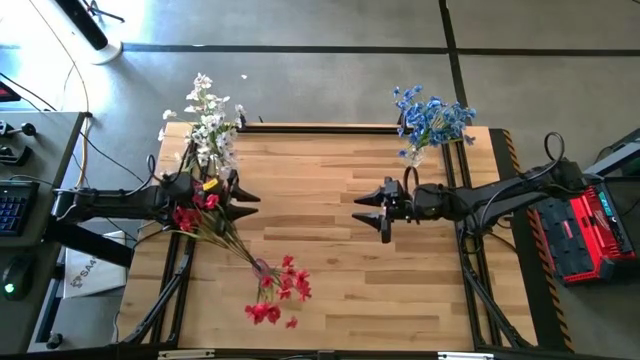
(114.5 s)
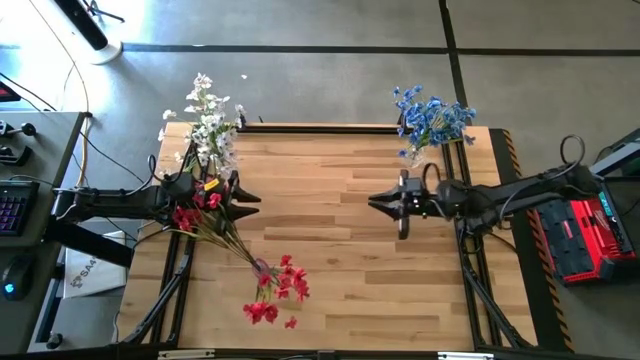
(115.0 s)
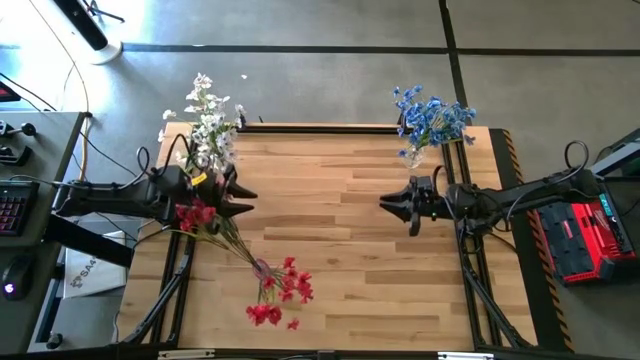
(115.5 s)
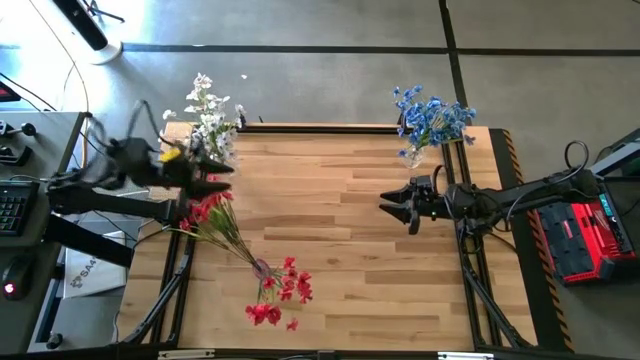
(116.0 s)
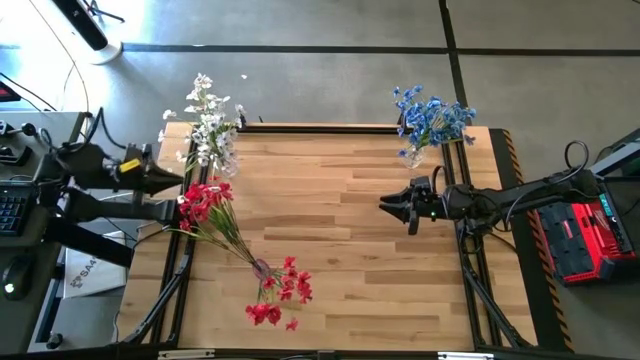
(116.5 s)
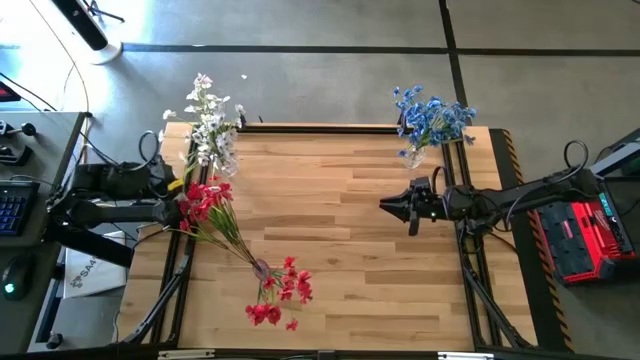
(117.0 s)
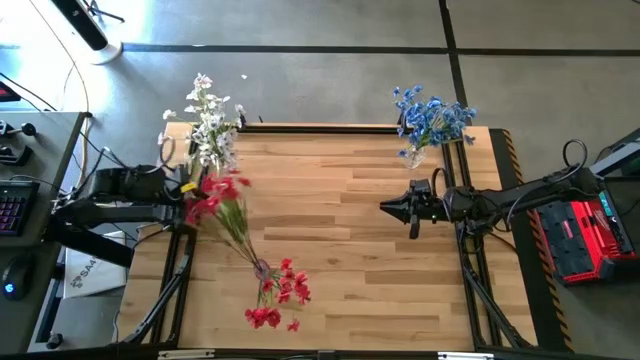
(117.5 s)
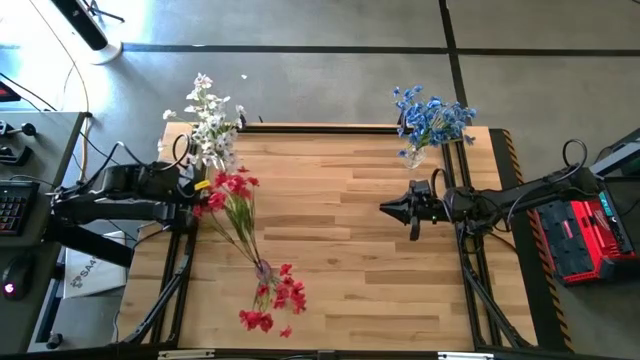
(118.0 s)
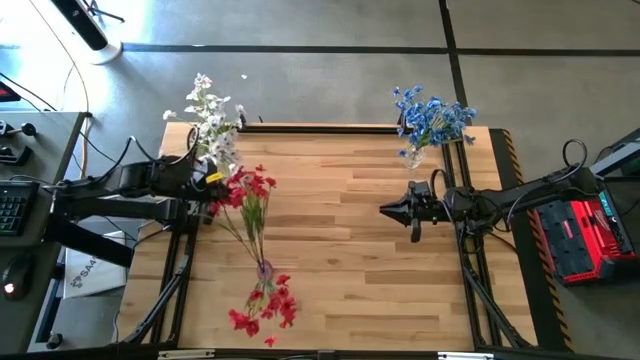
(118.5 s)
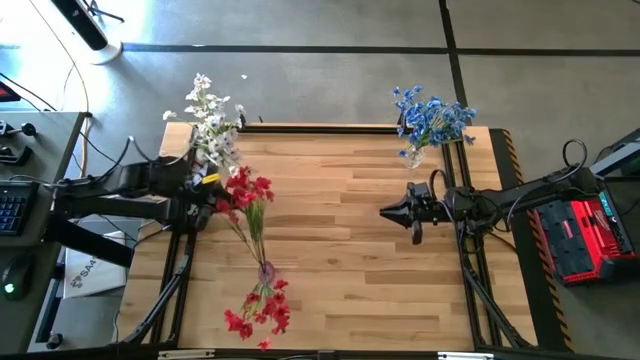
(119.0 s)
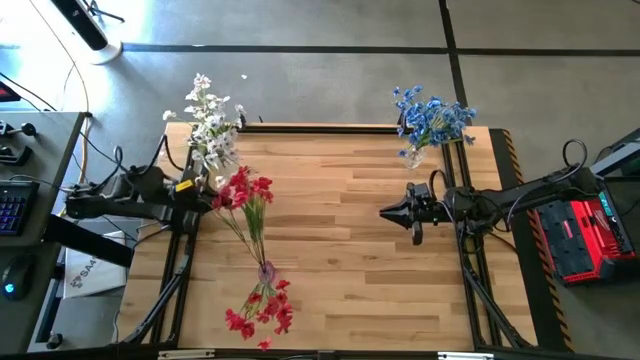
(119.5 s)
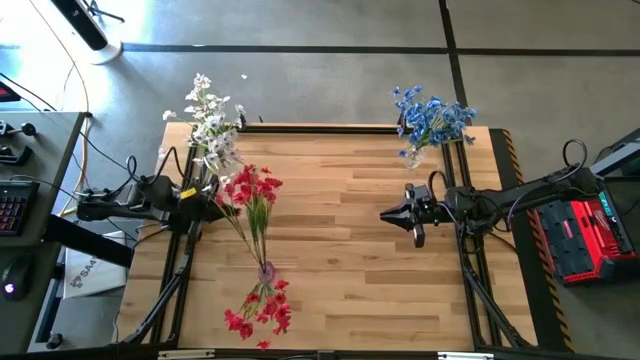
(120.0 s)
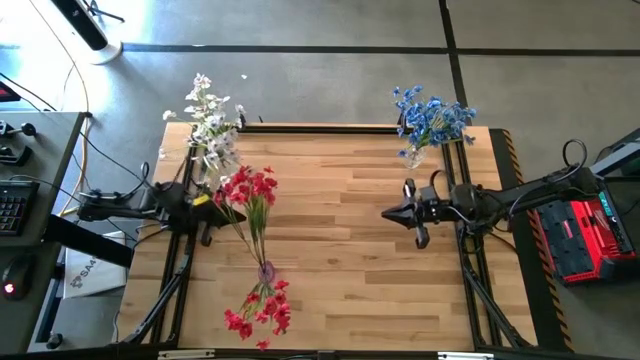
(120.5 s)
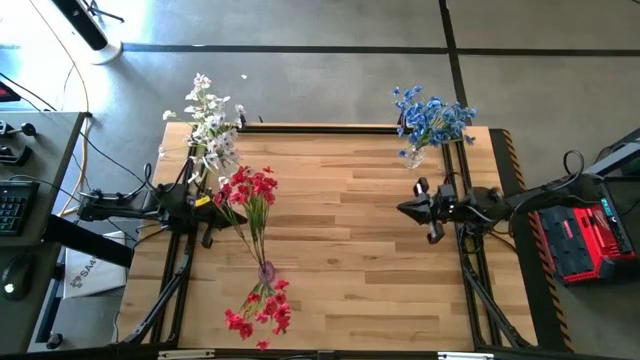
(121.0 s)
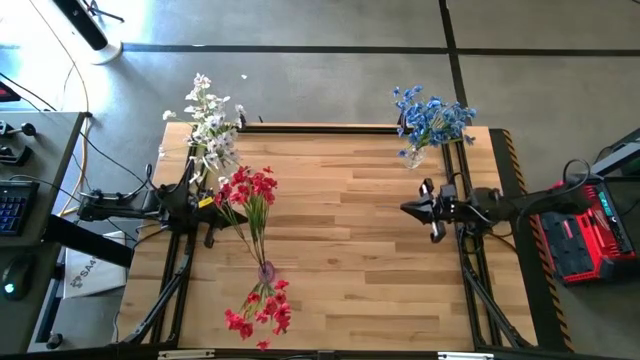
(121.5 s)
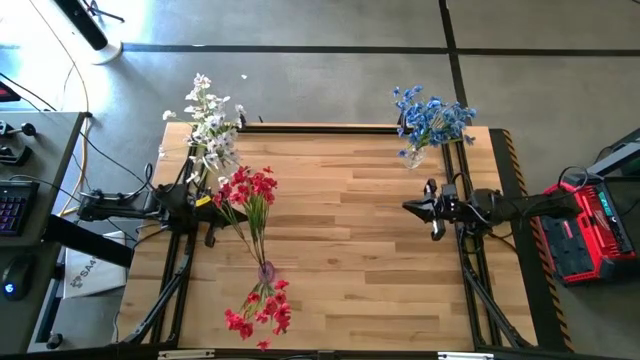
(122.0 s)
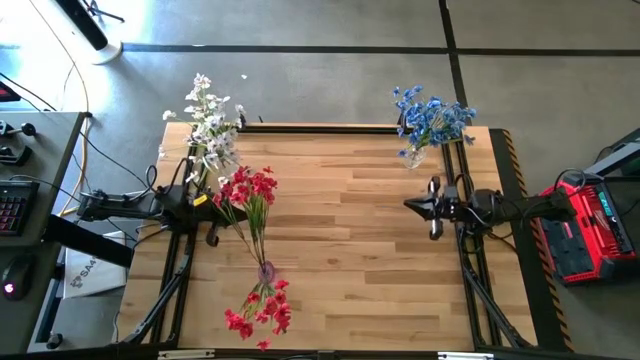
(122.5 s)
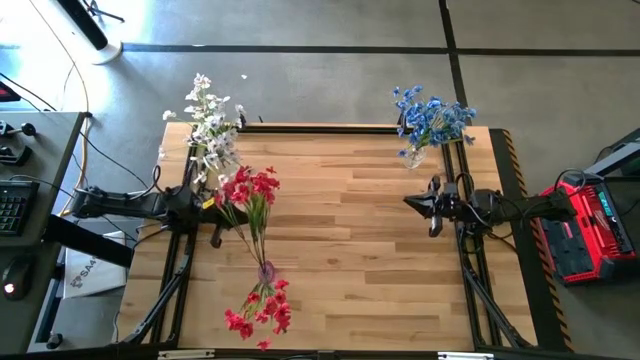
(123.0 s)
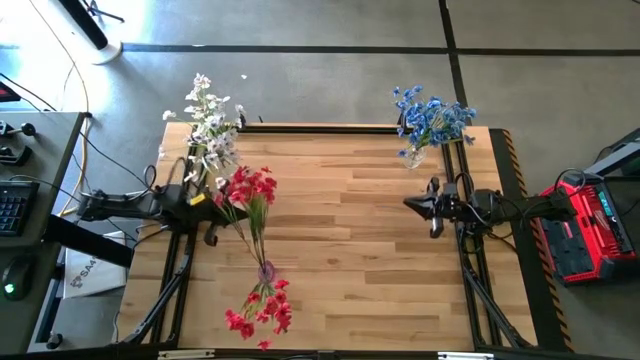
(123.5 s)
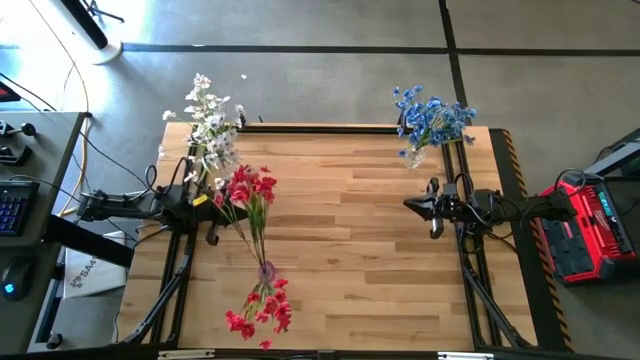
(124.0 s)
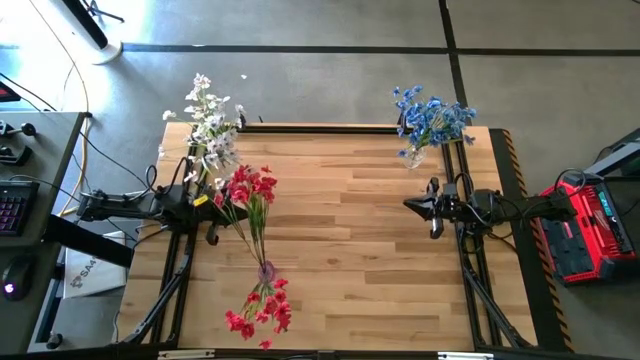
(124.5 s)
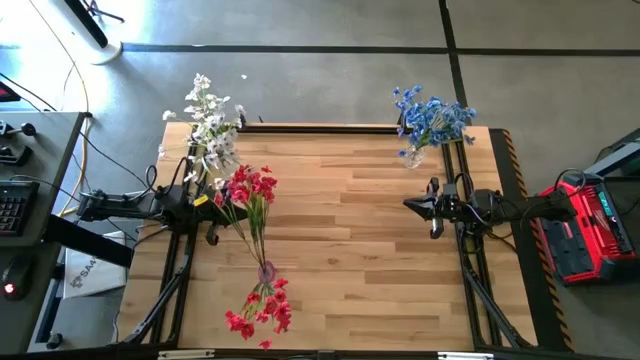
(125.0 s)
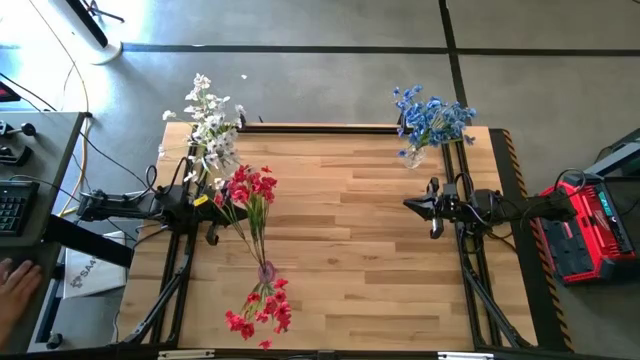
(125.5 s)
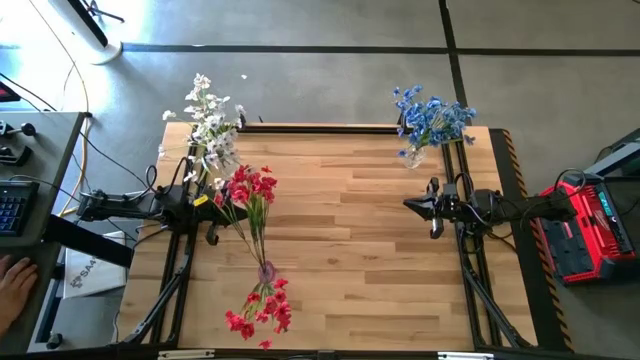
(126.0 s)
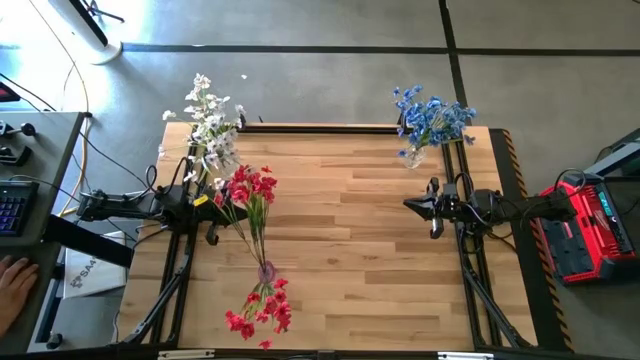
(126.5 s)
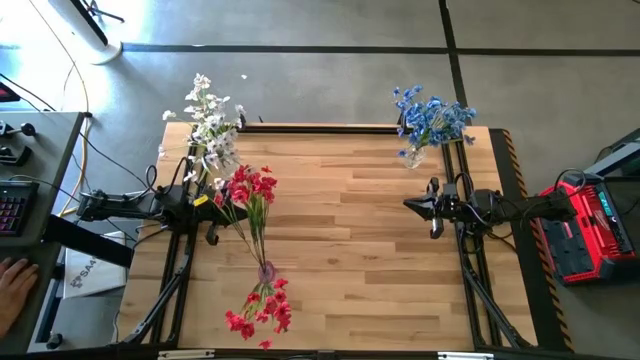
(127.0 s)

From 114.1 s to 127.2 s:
Task: Sort flowers into vase by color
Return to Home Position

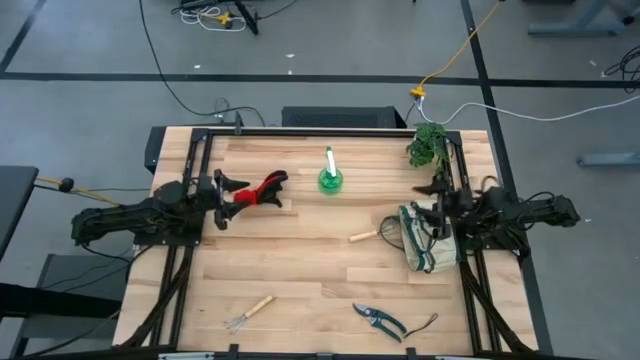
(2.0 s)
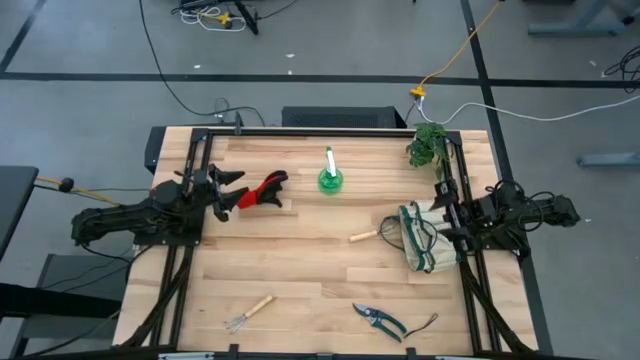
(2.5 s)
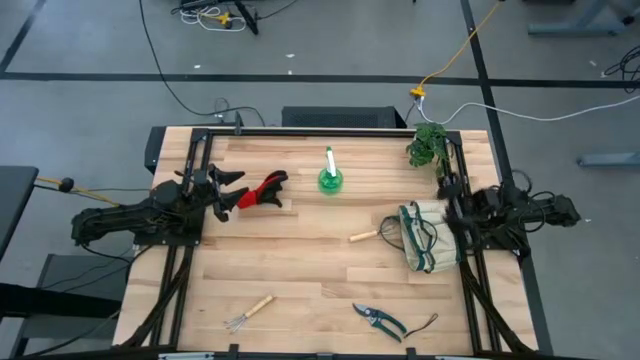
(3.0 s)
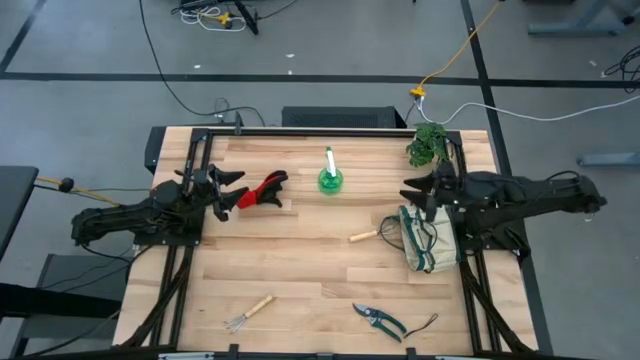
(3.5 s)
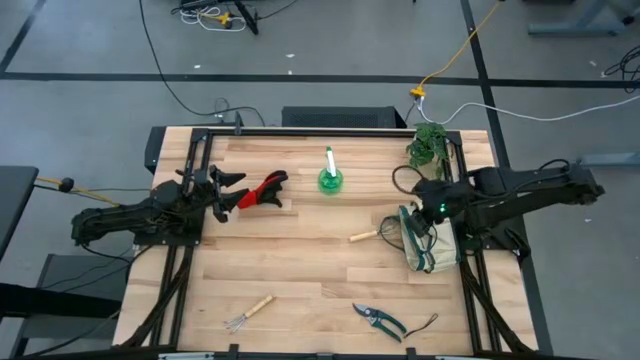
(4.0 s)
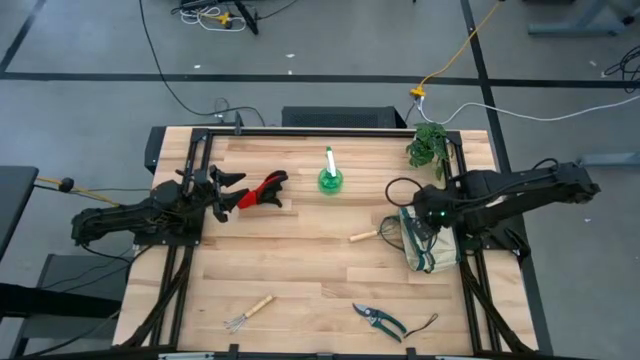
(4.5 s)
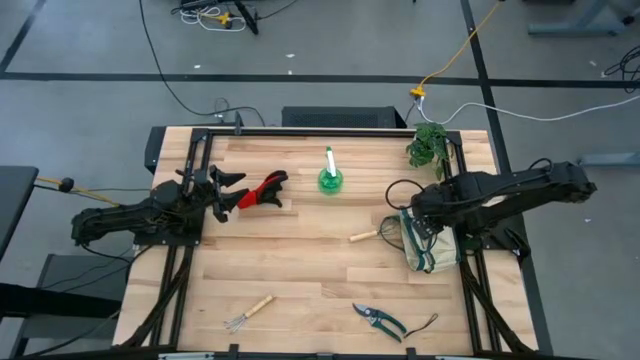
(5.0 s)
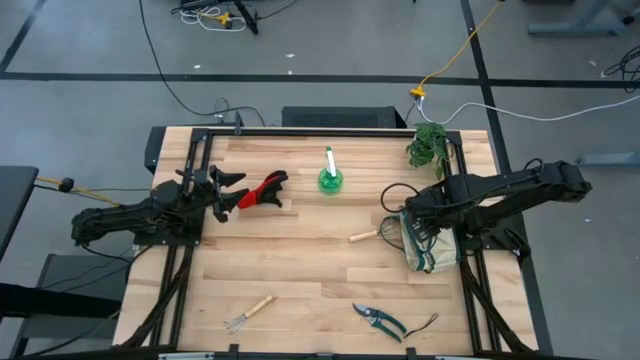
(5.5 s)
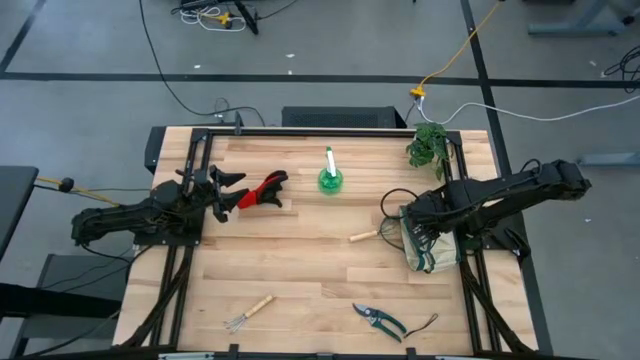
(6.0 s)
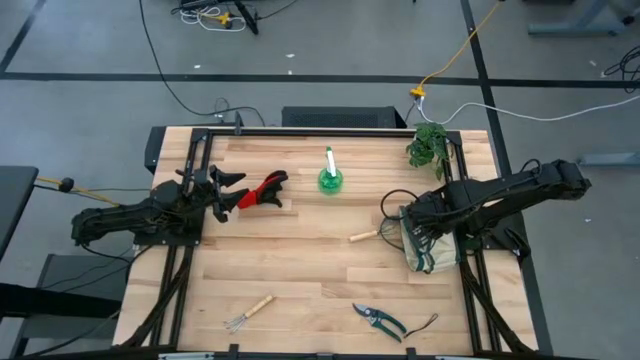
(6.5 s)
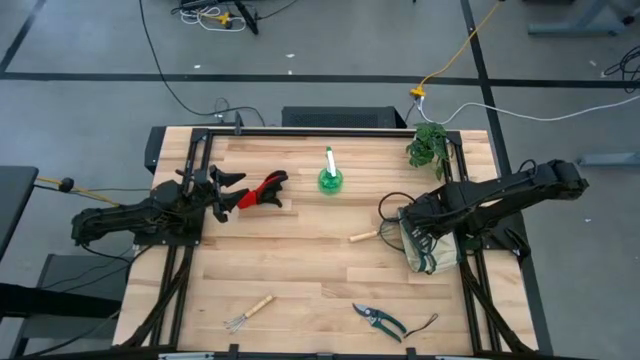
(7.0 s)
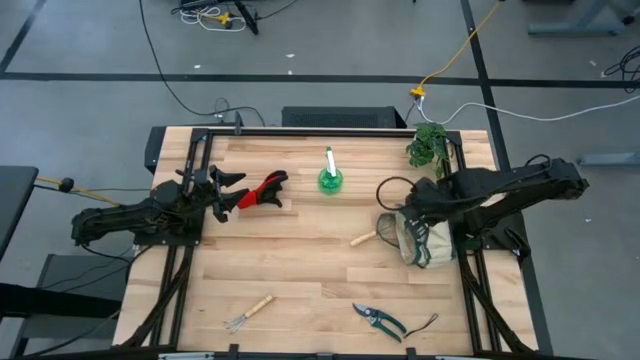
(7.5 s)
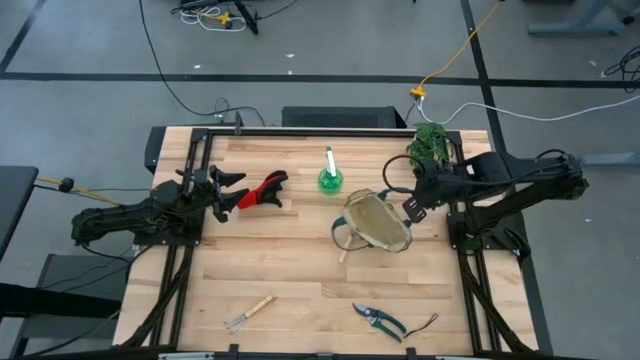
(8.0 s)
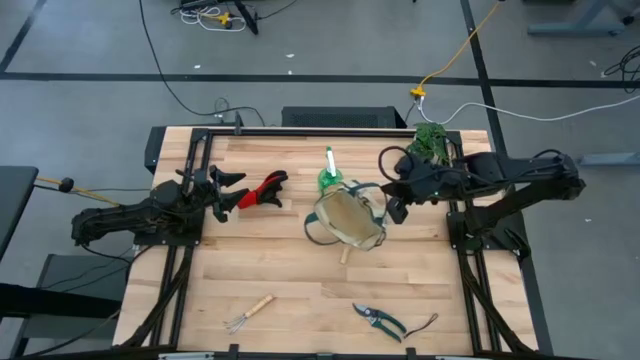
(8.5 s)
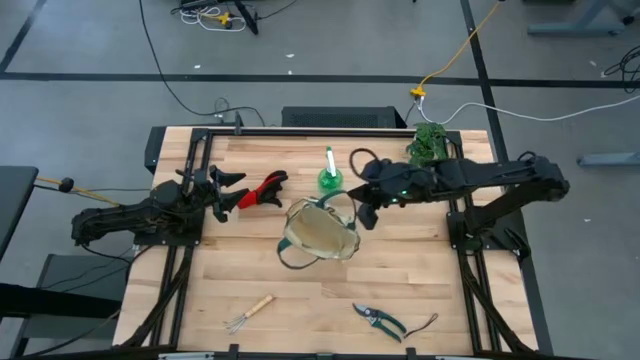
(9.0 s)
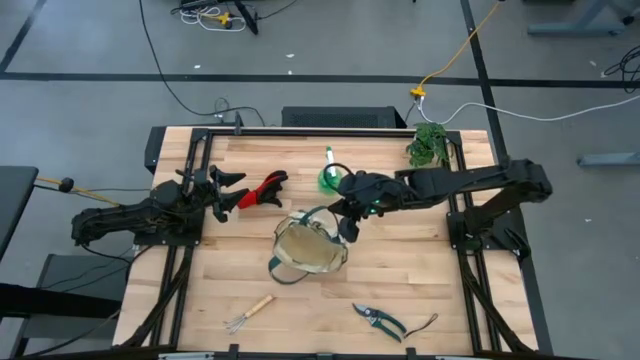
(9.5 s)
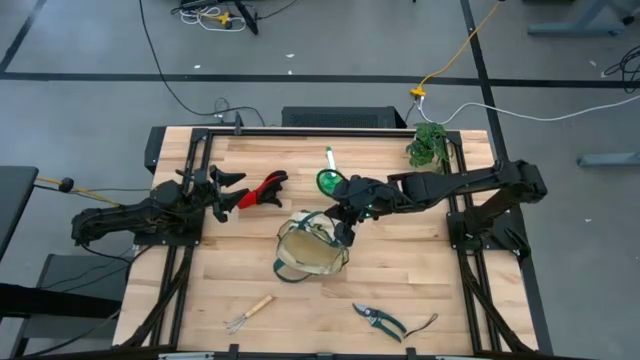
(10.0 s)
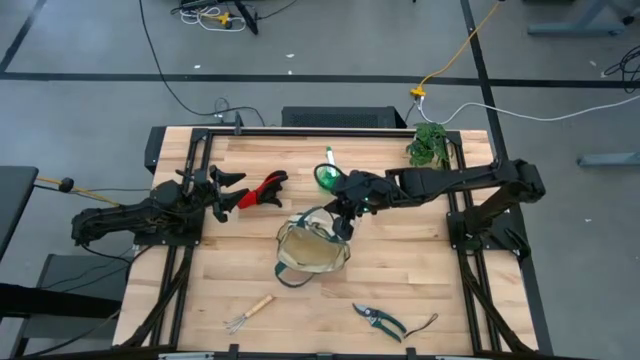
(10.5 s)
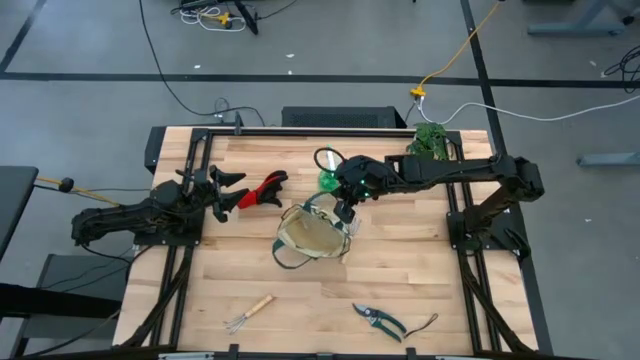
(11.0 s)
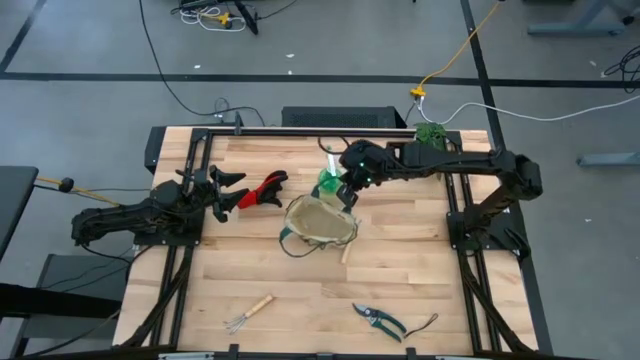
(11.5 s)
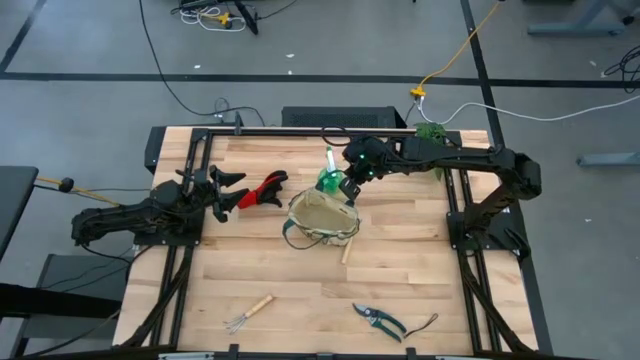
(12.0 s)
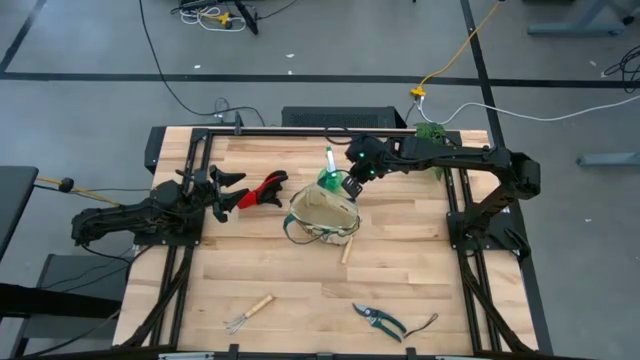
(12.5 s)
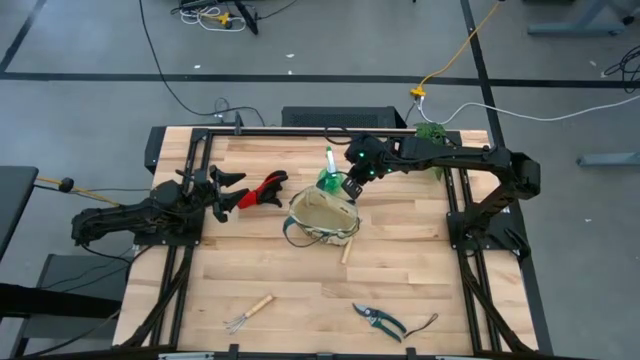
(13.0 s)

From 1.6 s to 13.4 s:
Task: Pick & Place Garden tools in Gardening bag
Prepare the white bag on the table
